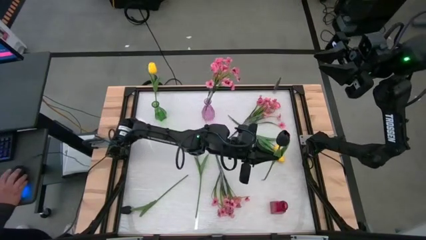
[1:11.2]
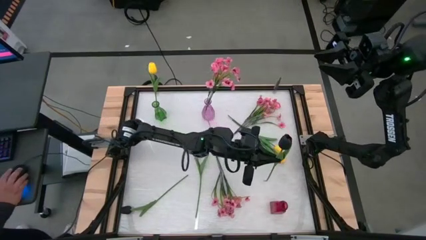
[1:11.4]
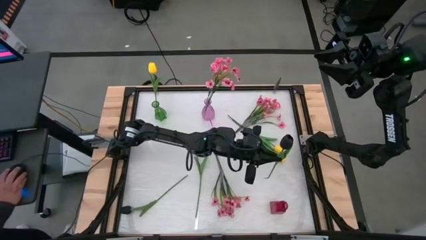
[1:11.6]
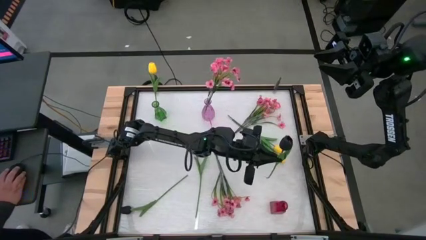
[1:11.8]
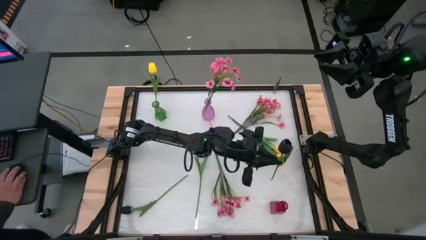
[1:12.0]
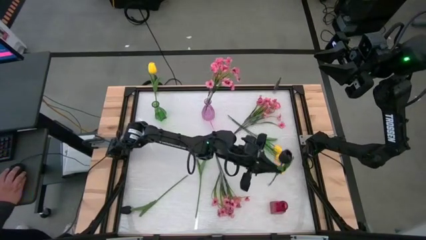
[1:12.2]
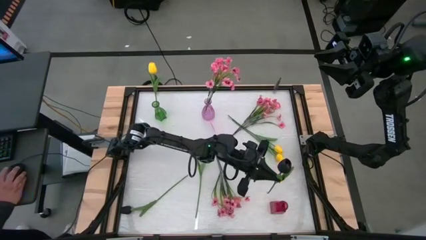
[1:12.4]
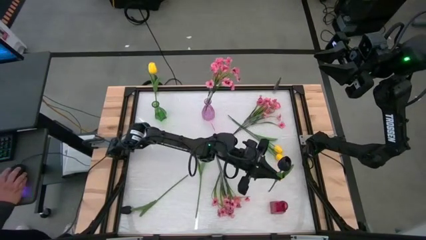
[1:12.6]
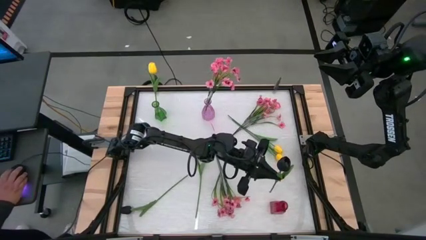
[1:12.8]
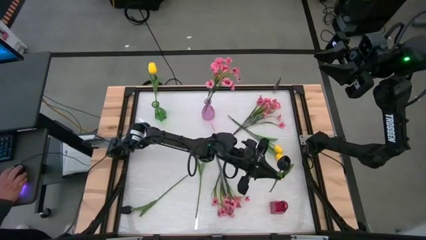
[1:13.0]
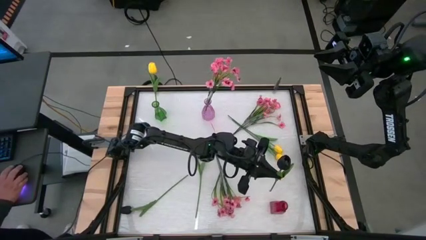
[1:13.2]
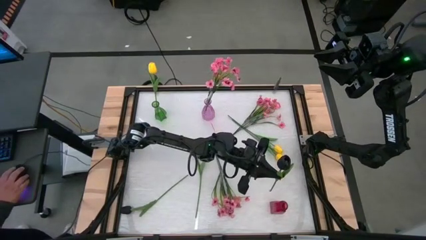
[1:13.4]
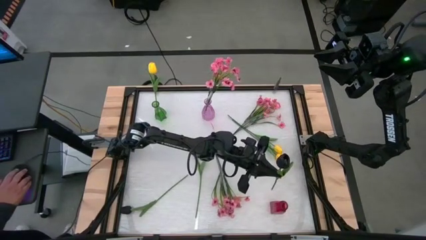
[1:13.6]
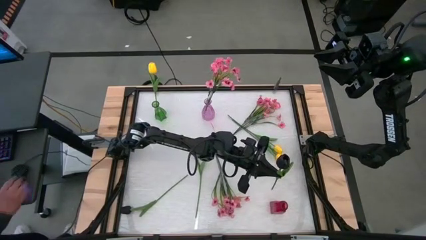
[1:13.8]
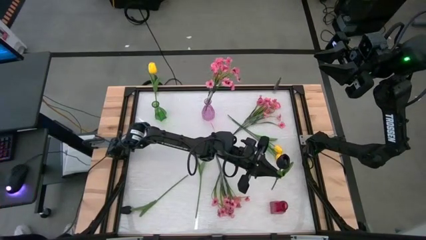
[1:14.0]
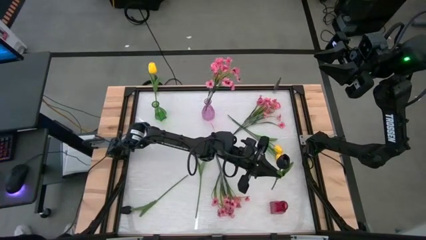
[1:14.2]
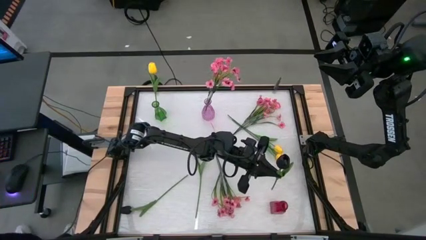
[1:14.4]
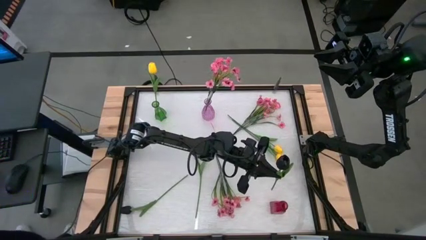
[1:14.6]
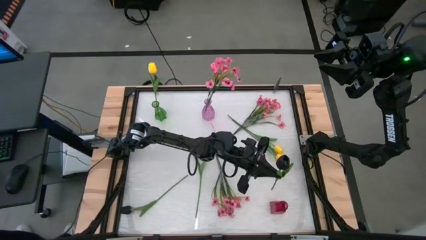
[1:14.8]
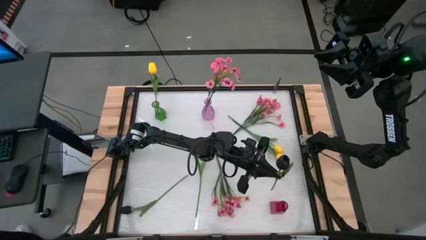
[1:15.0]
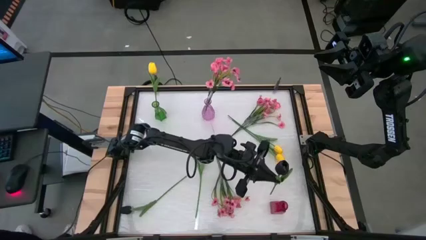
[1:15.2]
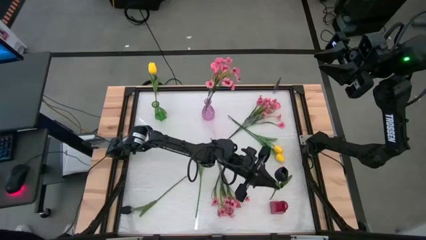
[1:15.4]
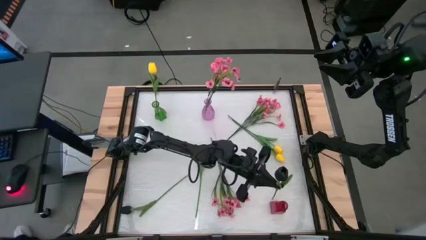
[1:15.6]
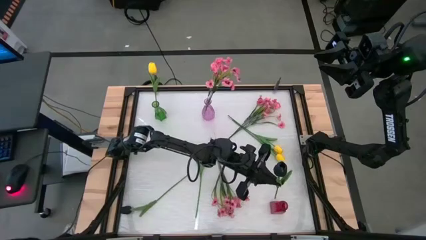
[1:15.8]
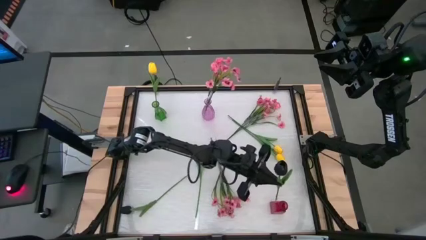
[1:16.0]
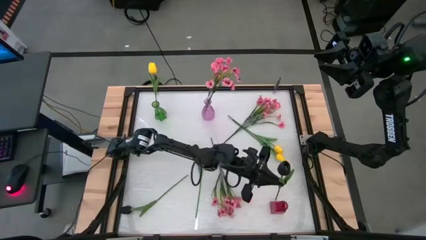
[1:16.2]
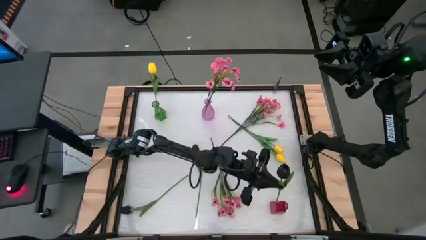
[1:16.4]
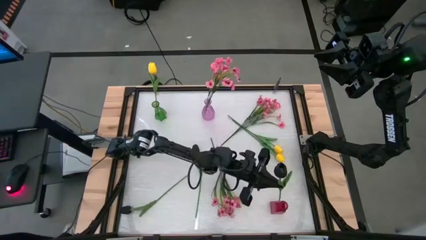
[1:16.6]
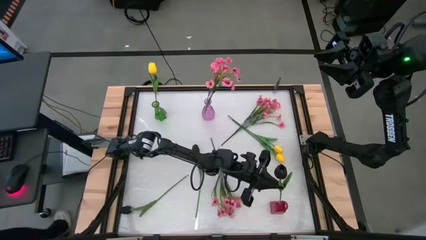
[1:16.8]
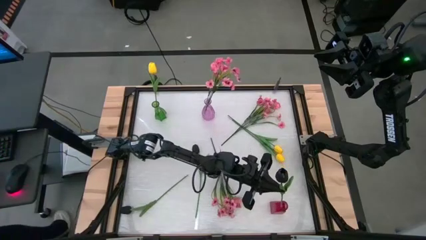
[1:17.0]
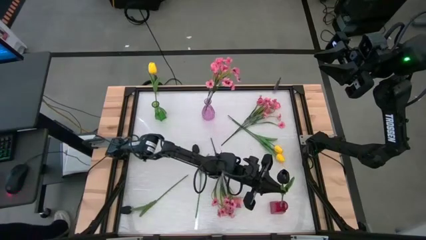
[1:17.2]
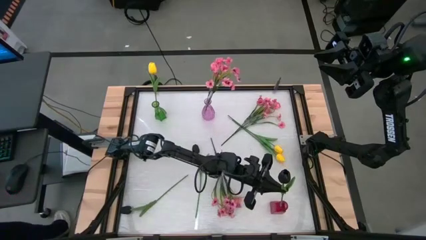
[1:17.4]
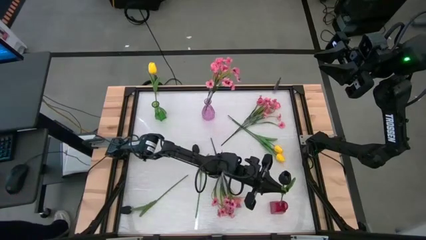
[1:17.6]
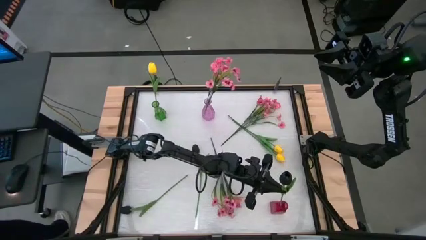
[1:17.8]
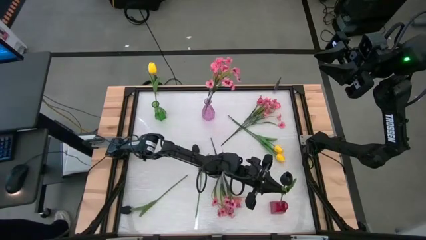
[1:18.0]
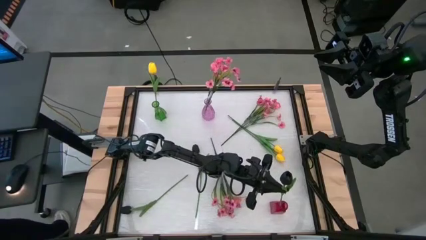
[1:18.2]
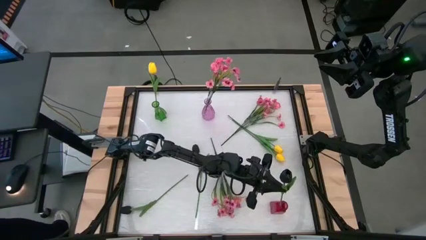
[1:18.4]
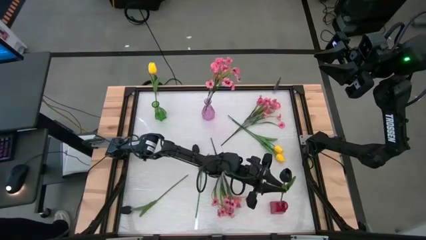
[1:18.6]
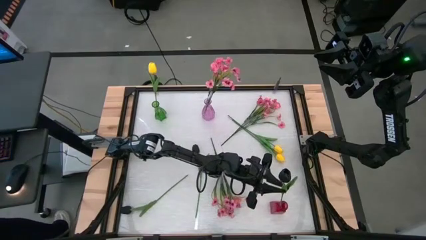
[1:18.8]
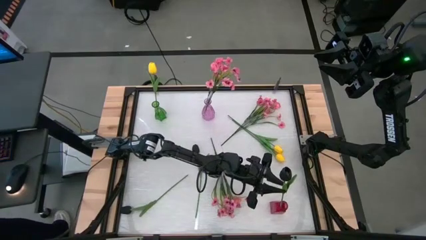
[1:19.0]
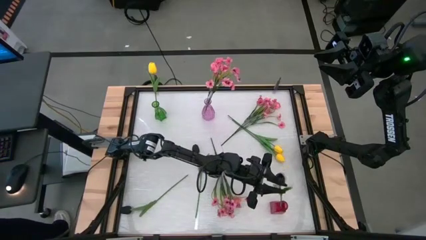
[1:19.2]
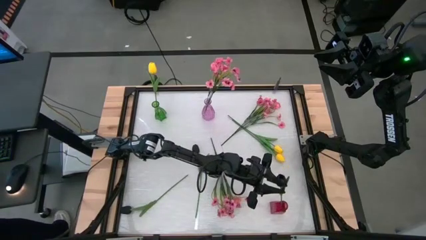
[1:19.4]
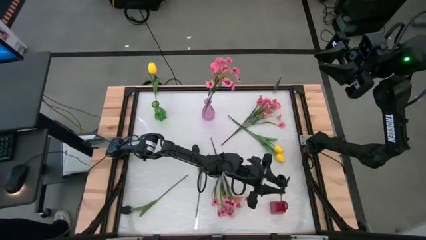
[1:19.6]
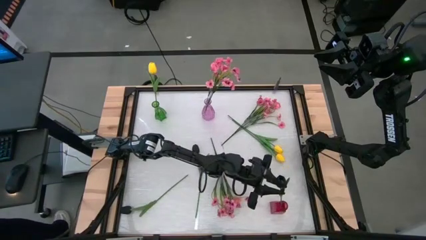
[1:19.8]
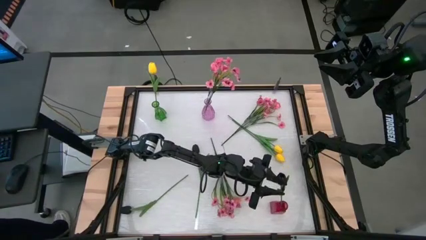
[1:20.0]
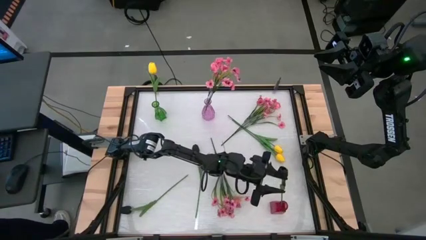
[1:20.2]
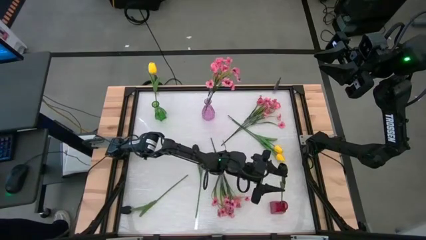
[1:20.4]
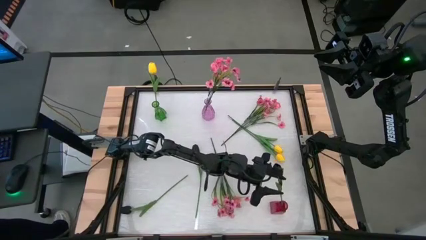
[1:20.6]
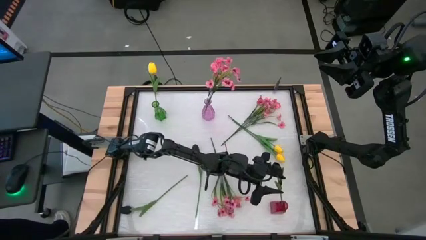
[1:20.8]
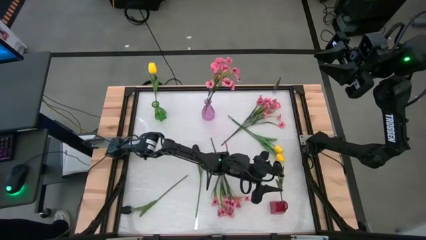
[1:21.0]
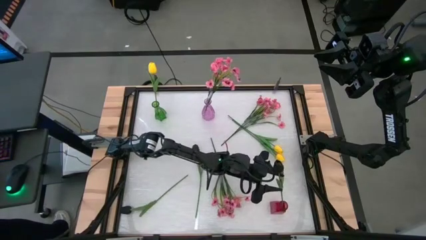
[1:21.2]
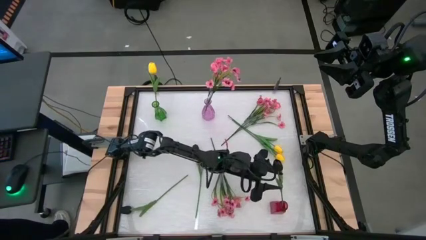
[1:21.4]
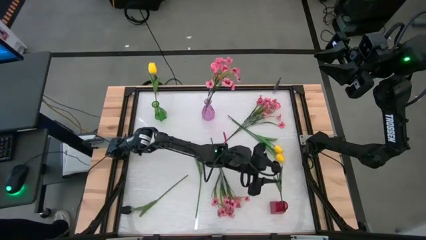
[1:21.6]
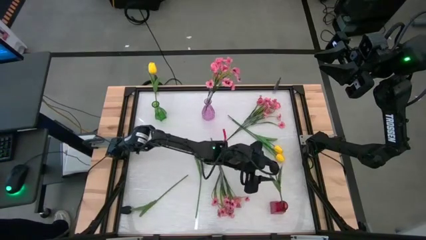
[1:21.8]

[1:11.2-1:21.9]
Task: Sort flowers into vase by color
Put the top black flower into the red vase

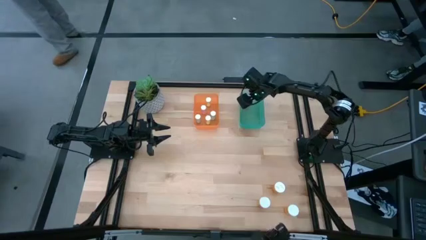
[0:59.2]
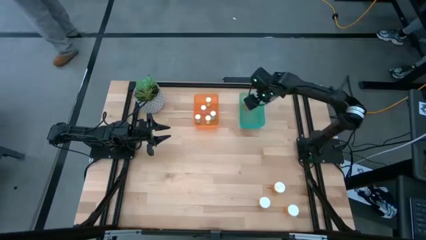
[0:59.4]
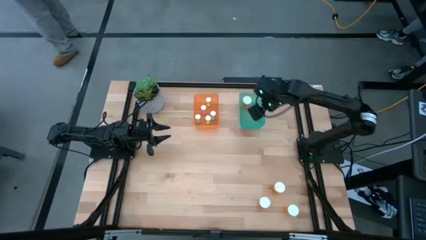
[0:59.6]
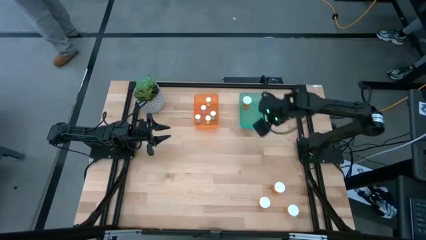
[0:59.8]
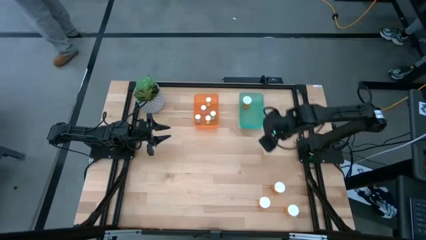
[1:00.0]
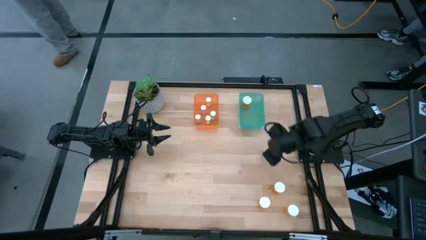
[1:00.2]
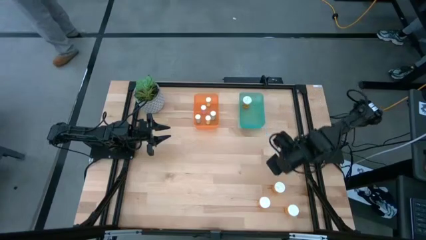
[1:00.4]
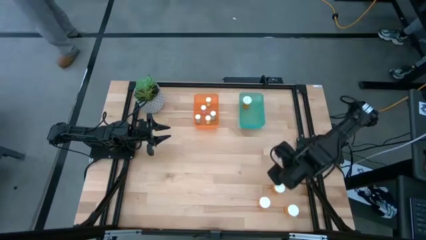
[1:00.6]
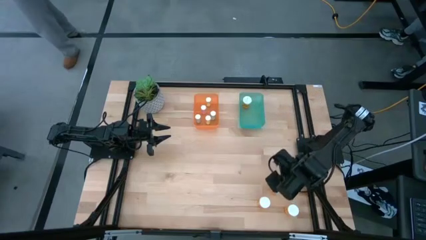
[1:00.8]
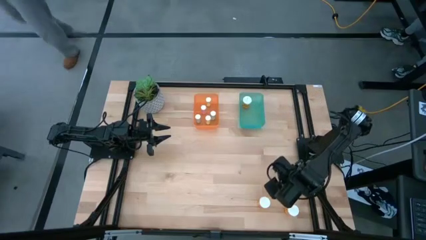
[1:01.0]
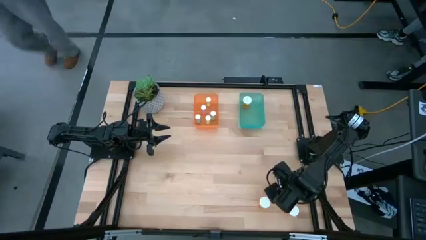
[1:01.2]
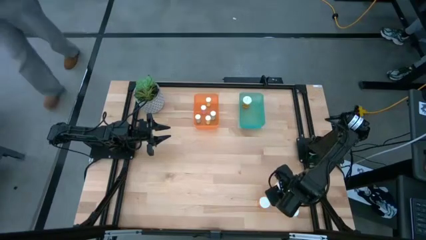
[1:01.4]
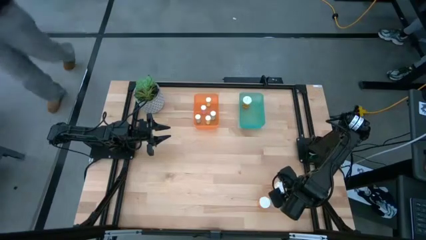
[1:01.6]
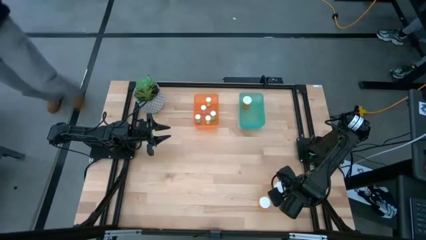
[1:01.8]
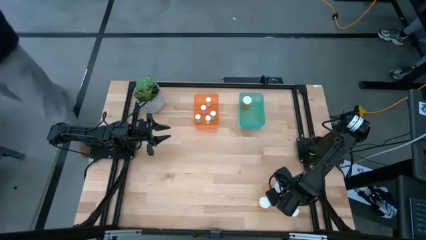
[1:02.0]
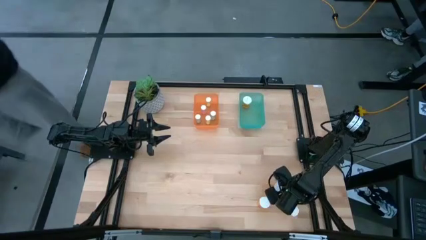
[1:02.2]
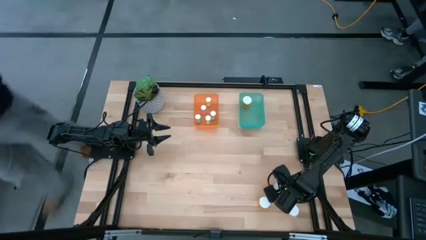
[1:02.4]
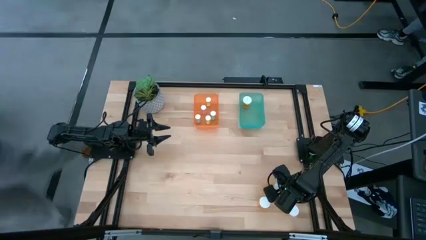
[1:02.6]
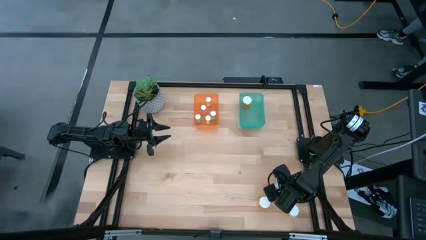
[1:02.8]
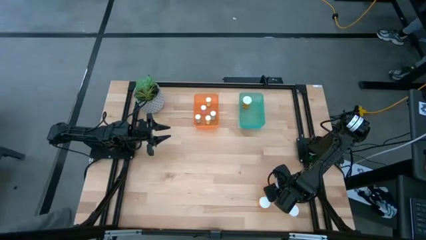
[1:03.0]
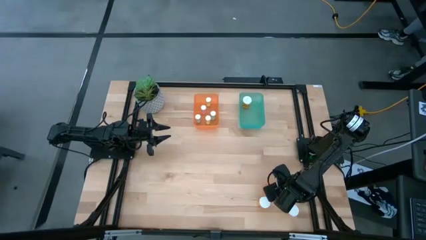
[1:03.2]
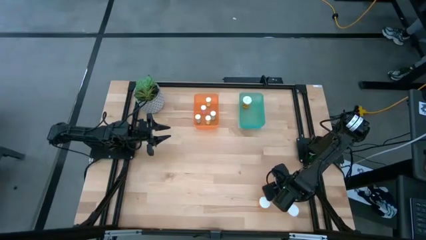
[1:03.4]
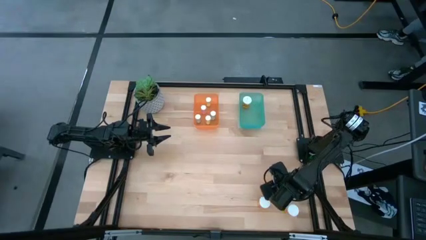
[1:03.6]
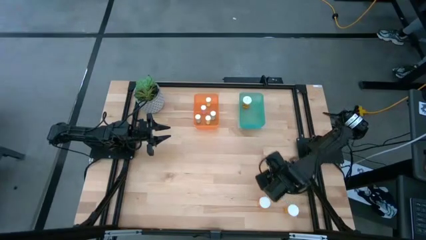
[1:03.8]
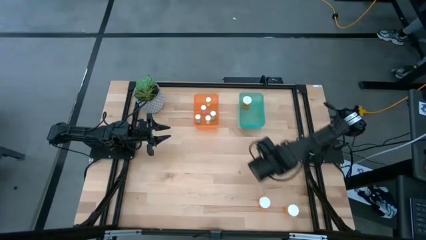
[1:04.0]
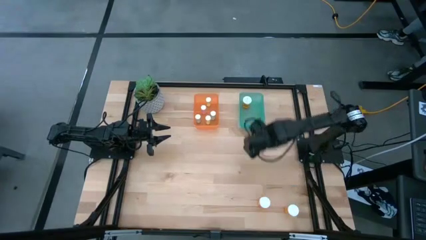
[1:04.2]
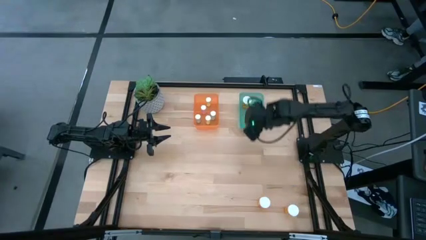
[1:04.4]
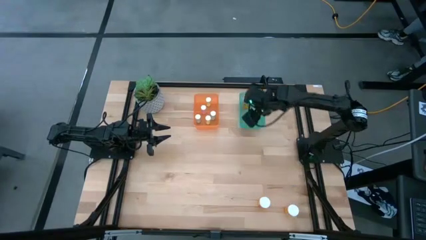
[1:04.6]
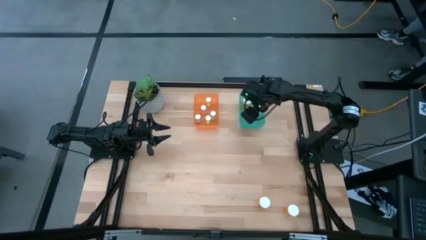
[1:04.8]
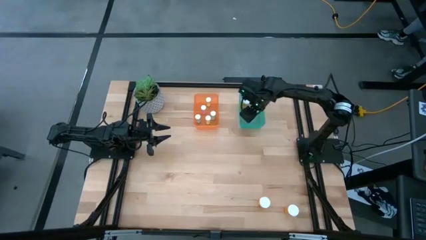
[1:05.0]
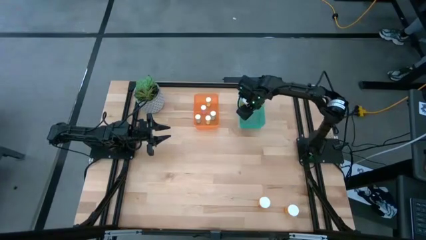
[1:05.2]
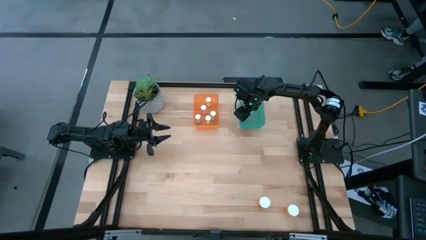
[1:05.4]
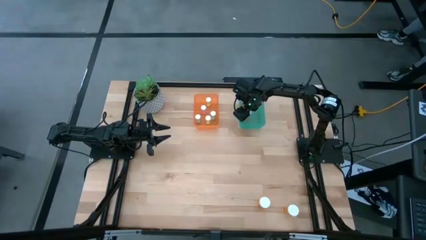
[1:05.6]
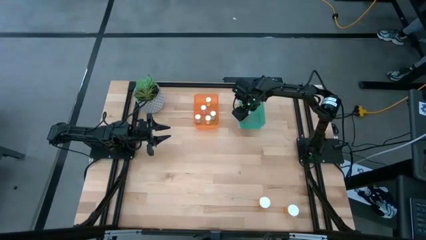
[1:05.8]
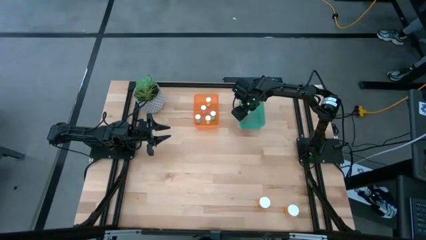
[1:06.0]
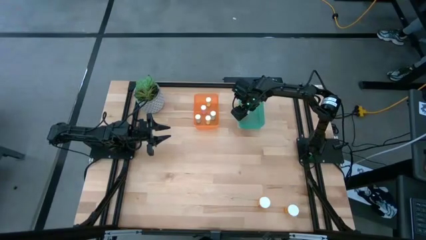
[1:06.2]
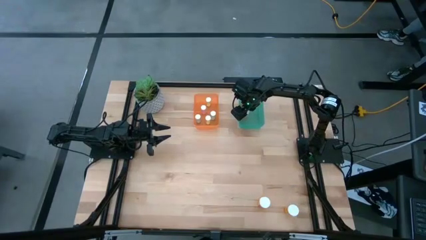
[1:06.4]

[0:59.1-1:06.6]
Task: Pick and place medicine bottles into bin by pill shape (circle, oval)
Put the large orange pill bottle into the blue bin
